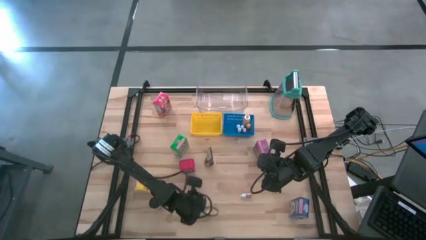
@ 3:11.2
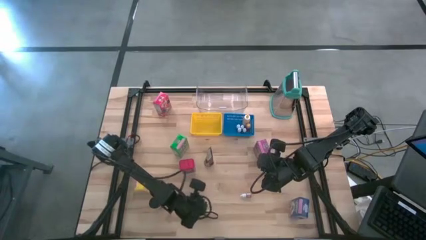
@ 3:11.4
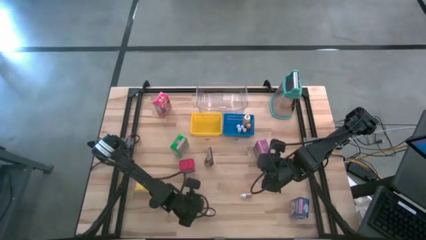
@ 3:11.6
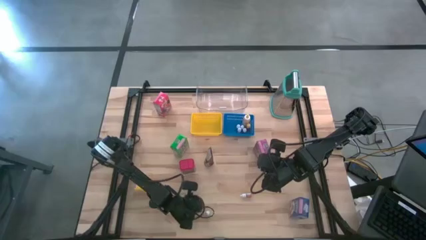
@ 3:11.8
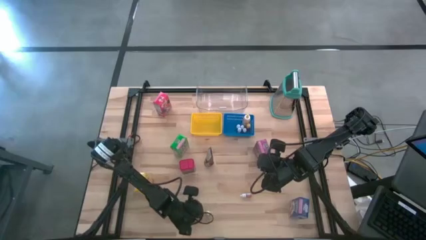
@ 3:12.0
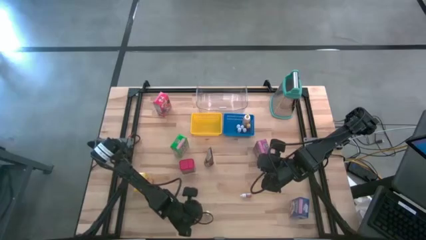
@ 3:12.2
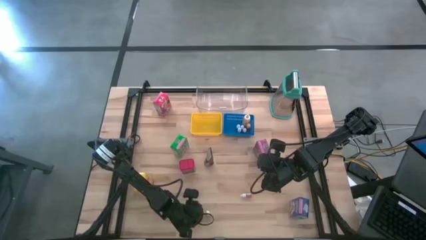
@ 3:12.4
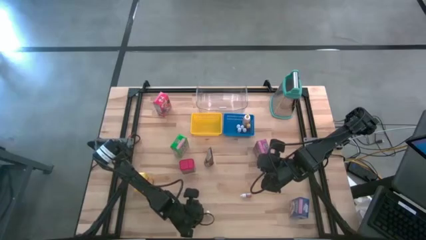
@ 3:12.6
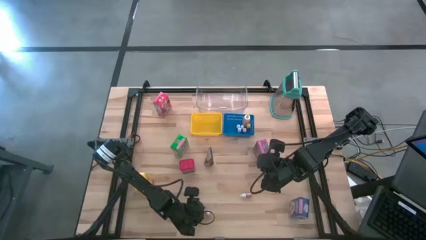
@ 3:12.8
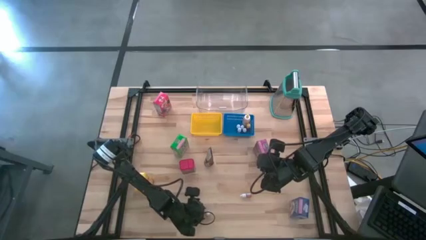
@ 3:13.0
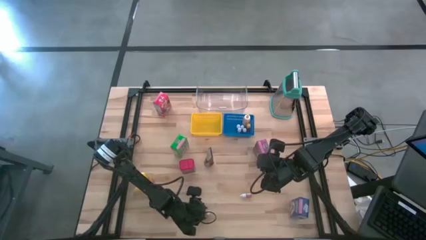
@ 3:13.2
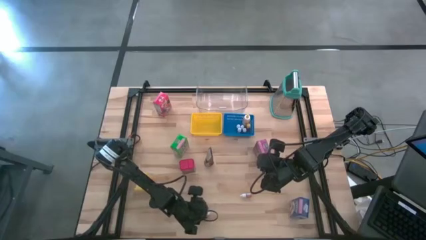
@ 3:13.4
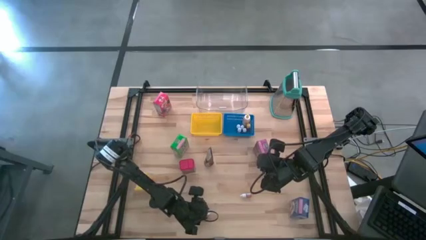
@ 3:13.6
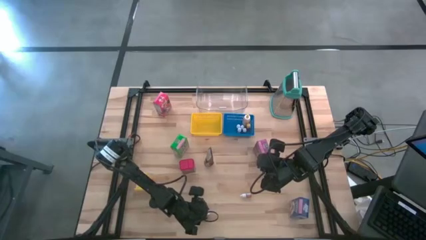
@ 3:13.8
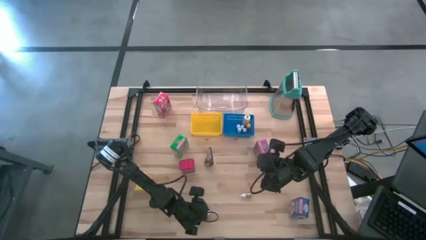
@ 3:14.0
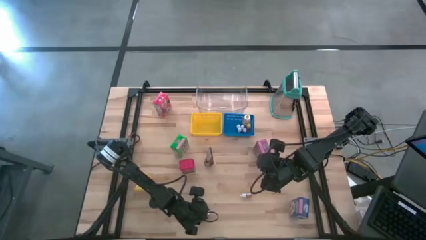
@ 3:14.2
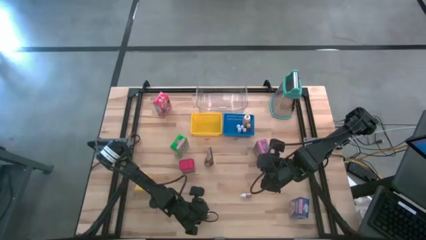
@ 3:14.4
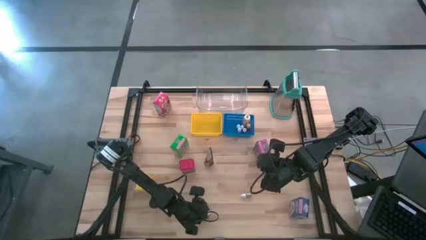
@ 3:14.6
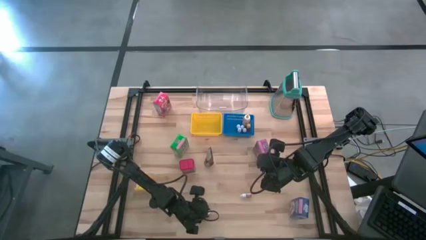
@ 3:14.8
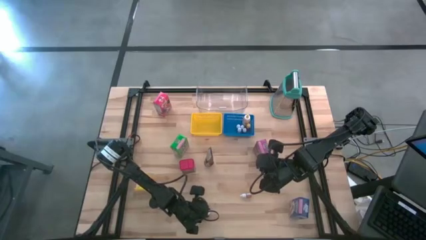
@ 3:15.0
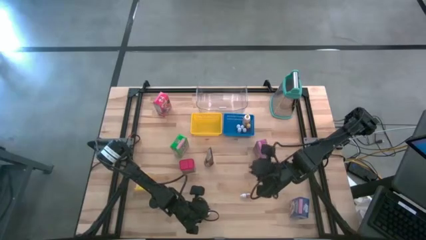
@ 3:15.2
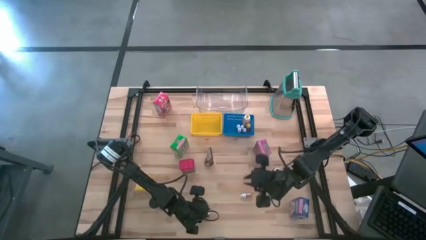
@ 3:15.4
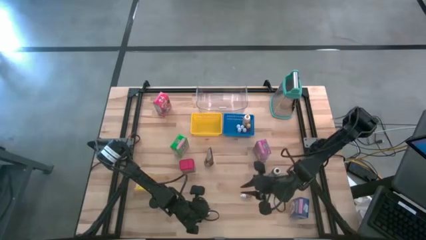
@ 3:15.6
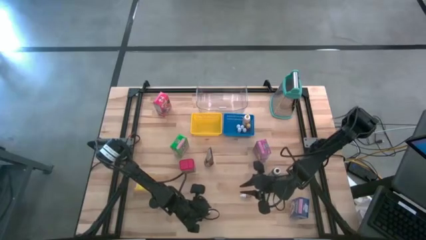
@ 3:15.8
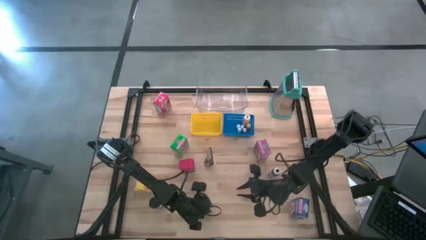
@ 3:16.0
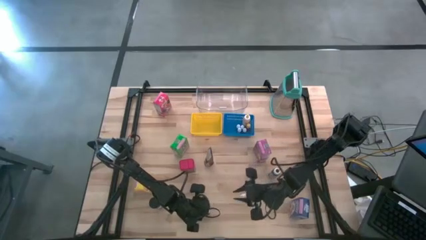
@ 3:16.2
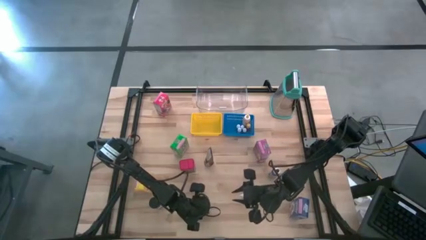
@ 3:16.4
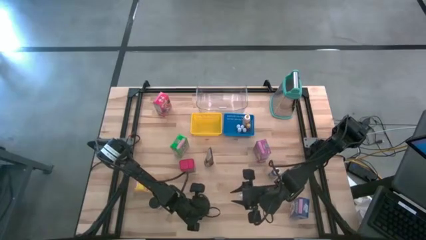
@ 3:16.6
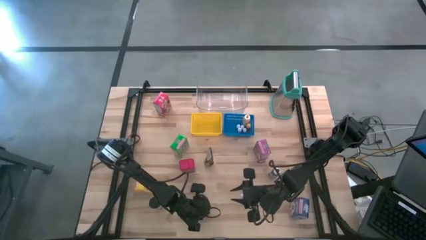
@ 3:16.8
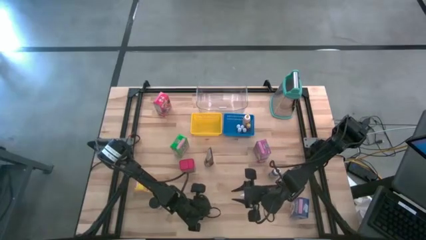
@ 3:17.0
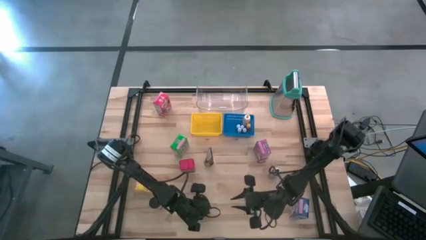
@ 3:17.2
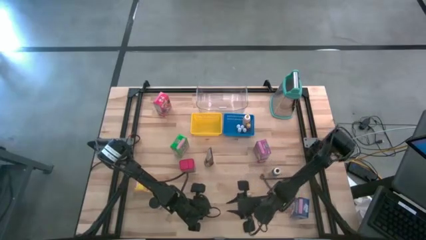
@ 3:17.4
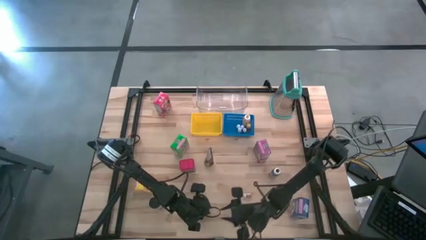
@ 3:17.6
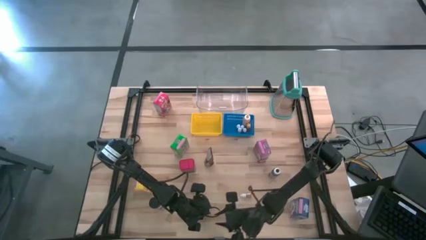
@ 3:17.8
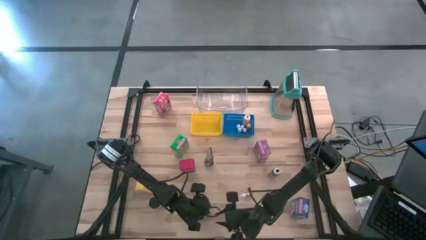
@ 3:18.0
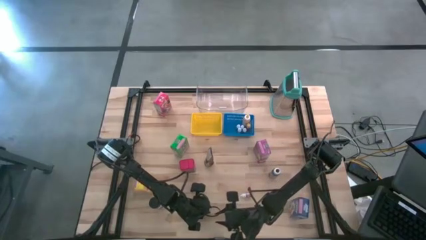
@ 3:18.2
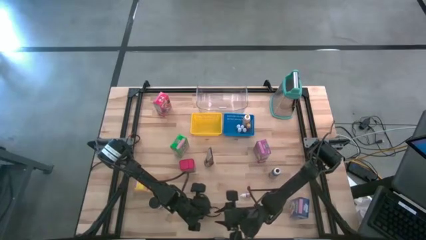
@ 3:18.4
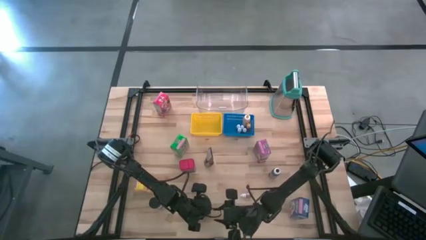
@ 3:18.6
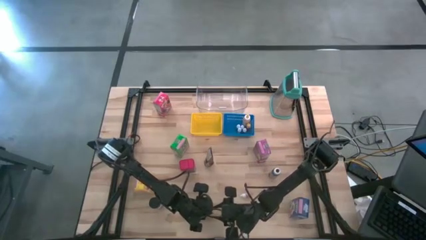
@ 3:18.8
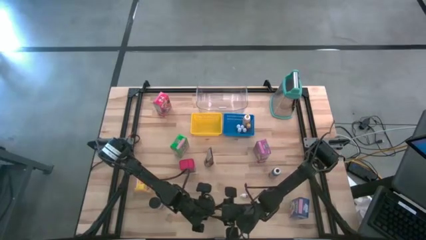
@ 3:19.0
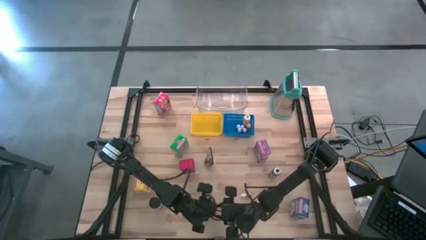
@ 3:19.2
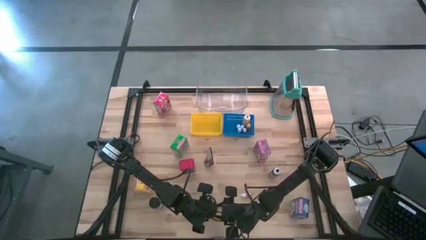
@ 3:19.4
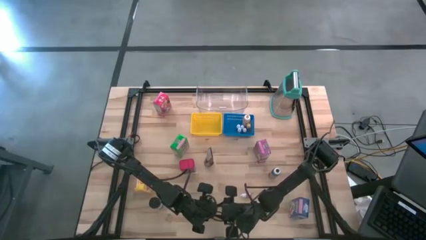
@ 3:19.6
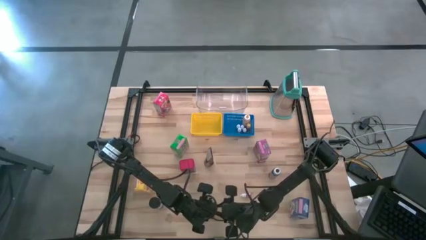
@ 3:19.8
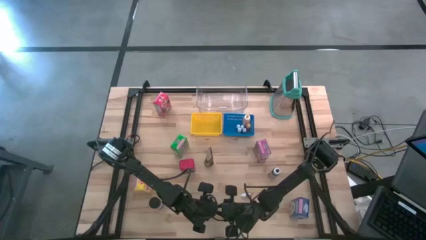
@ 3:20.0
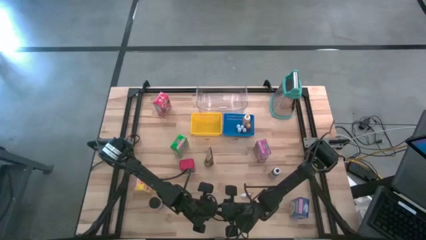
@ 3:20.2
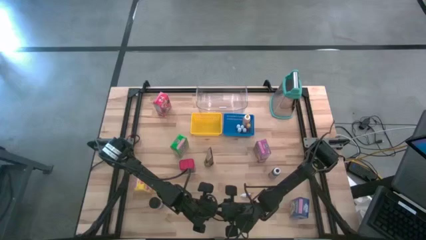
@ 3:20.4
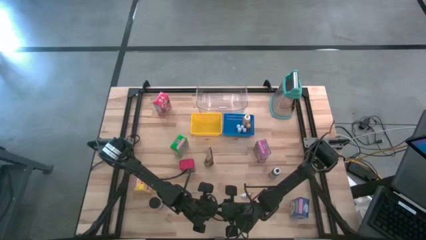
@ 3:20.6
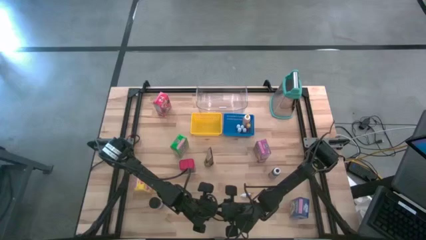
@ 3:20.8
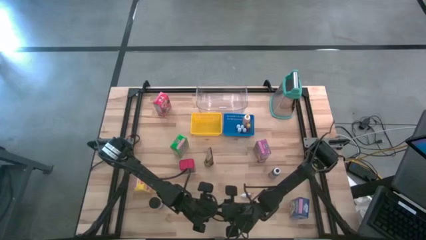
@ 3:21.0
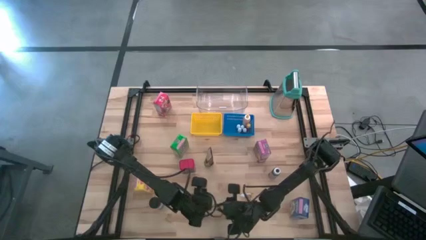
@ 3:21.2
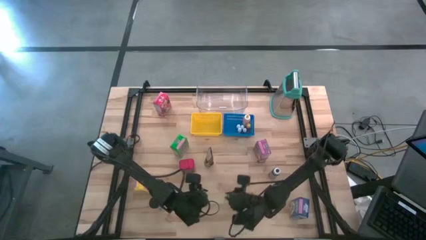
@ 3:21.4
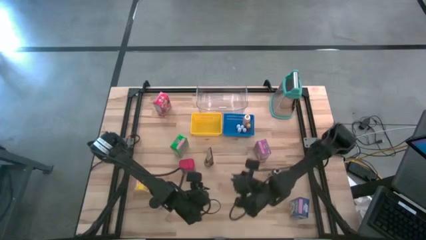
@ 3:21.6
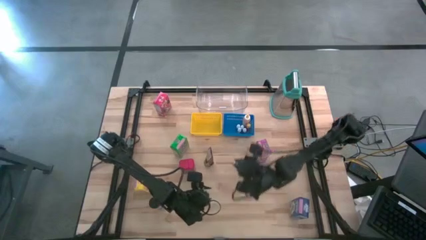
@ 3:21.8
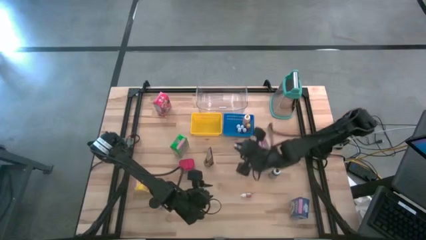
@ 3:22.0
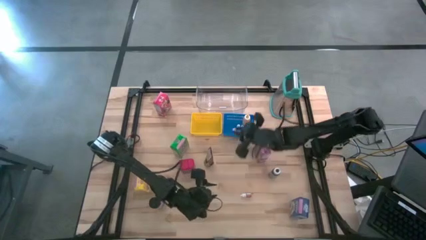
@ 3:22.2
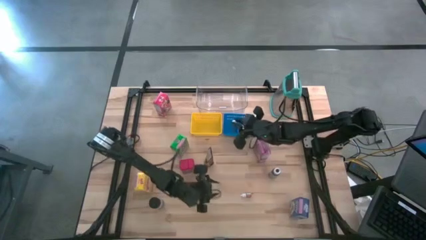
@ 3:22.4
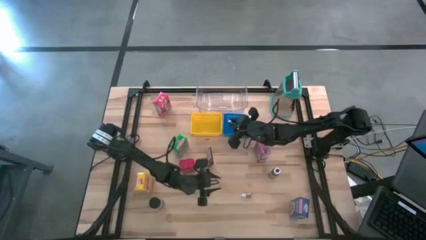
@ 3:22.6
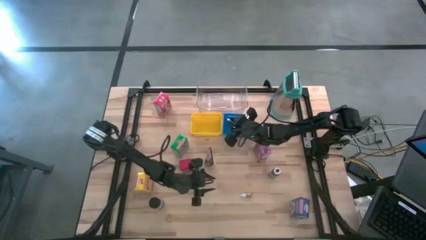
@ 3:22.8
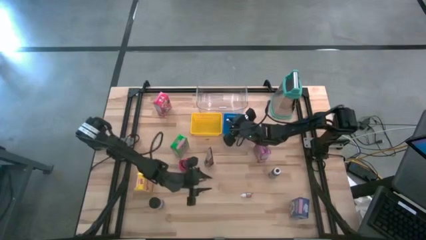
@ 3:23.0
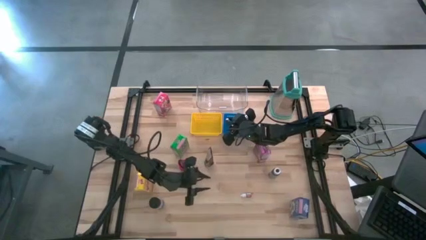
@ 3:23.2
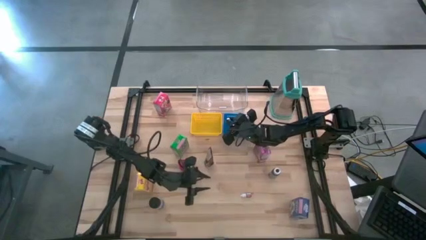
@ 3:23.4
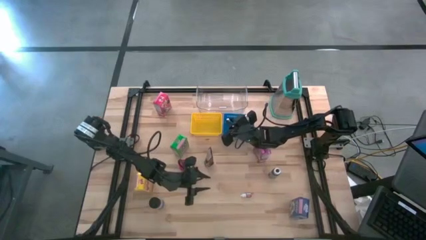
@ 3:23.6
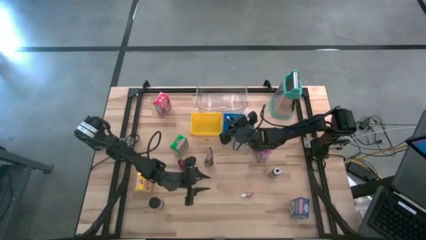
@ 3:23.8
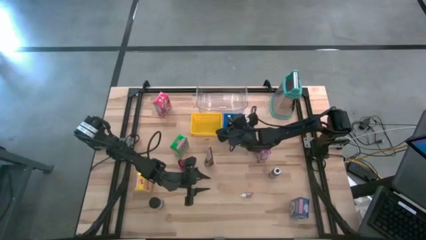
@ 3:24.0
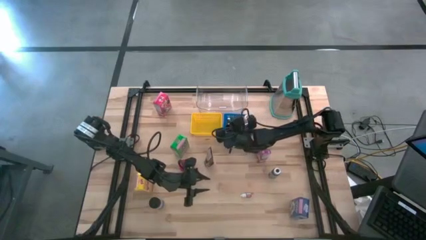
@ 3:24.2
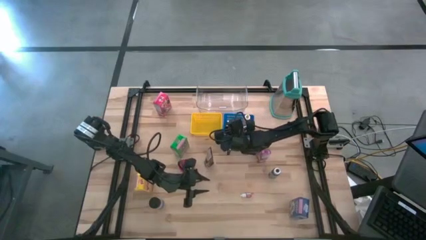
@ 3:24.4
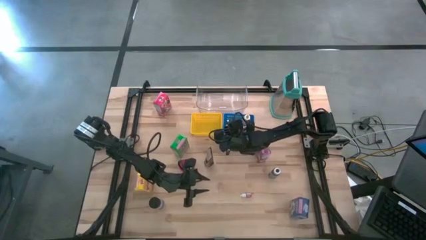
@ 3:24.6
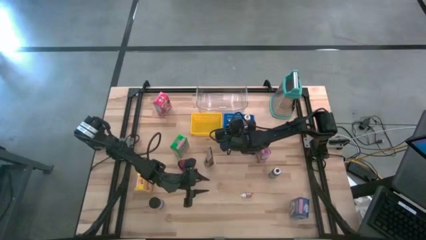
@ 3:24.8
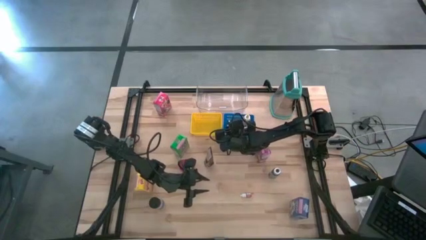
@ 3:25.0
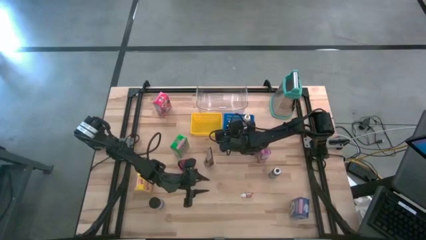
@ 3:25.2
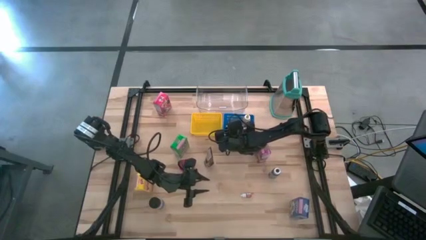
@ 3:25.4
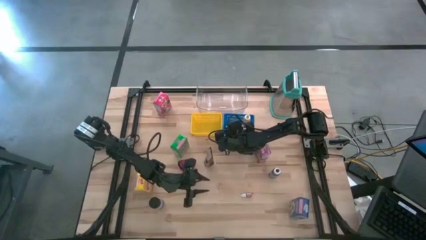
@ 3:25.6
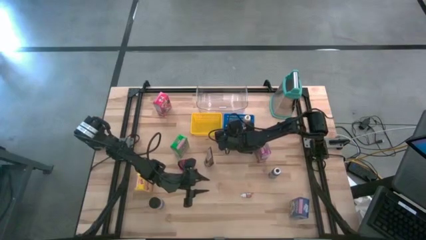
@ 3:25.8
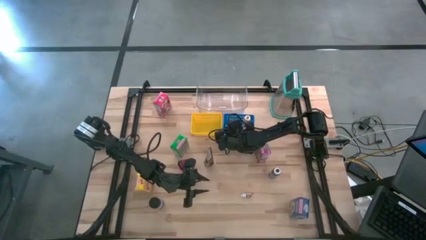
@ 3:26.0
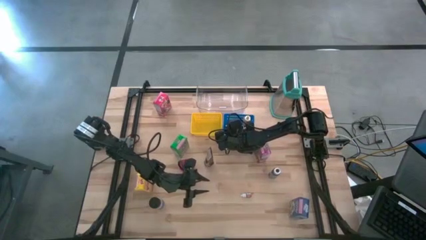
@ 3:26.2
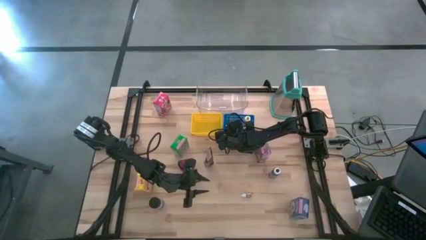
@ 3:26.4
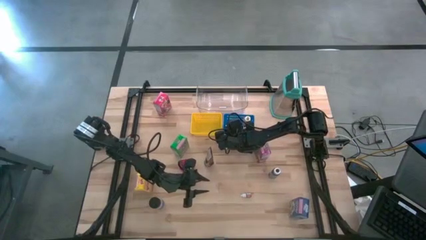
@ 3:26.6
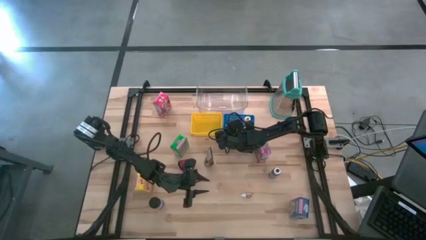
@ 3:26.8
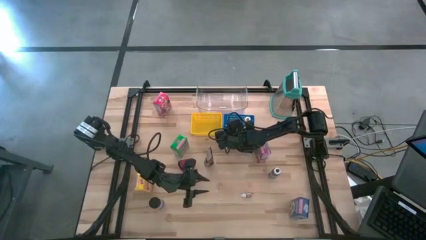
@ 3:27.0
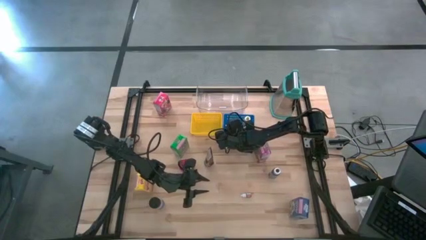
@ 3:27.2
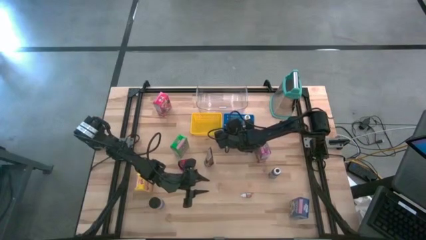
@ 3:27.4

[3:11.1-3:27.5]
Task: Pick & Place Kitchen Items
Put the purple food coloring bottle into the blue bin
